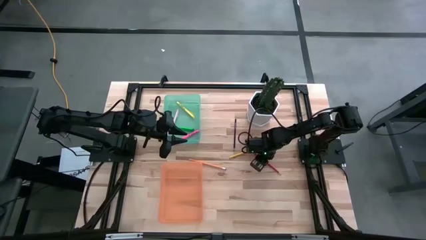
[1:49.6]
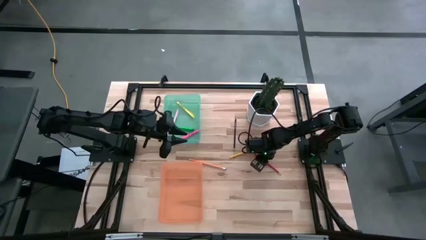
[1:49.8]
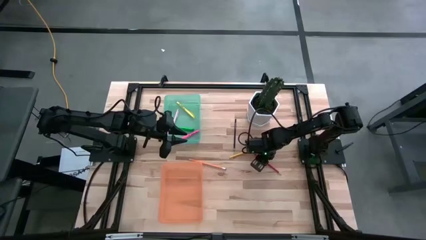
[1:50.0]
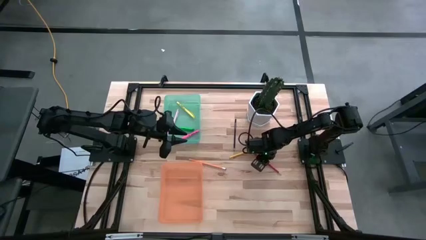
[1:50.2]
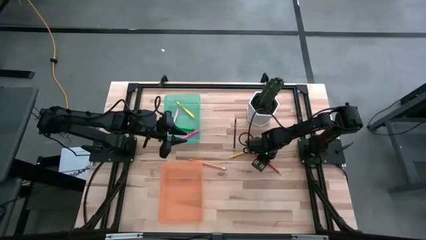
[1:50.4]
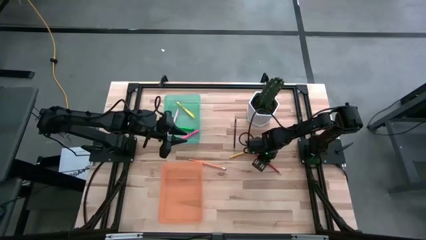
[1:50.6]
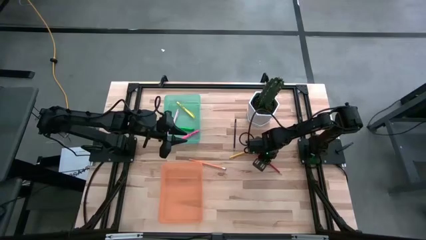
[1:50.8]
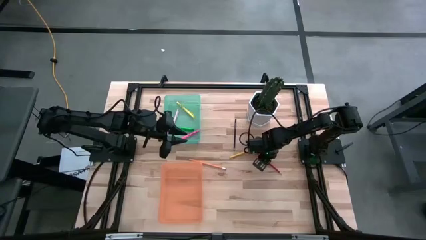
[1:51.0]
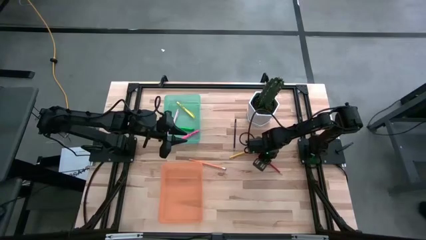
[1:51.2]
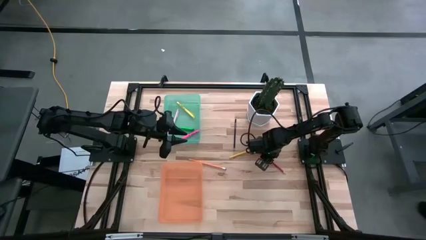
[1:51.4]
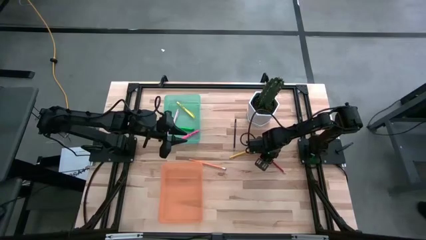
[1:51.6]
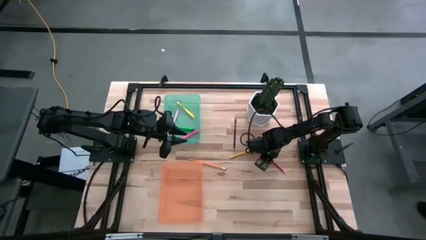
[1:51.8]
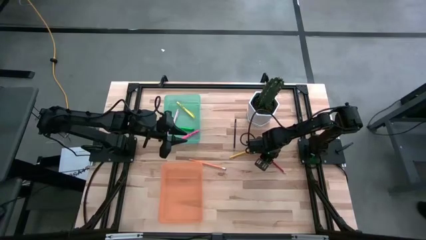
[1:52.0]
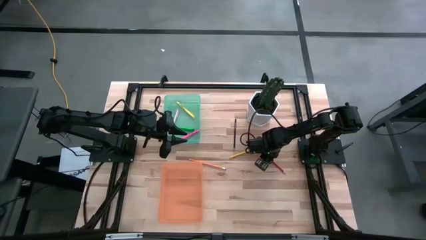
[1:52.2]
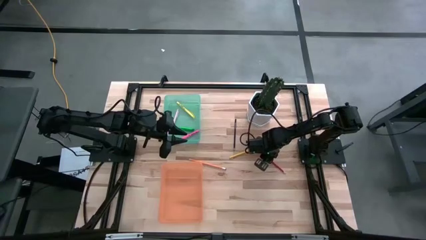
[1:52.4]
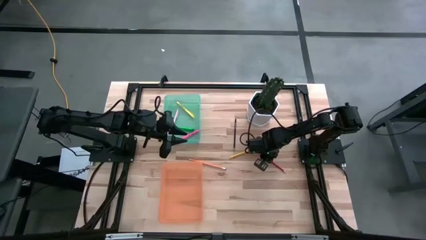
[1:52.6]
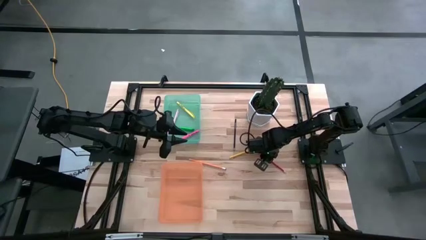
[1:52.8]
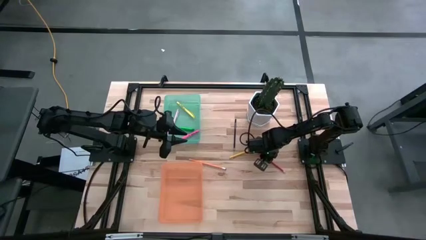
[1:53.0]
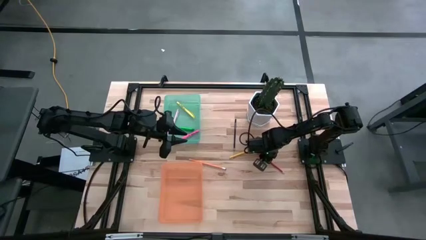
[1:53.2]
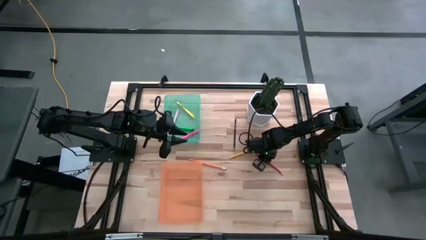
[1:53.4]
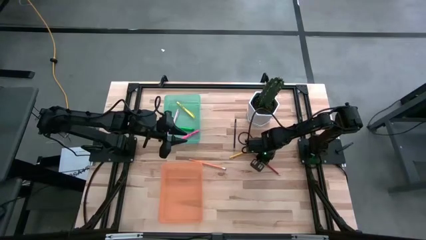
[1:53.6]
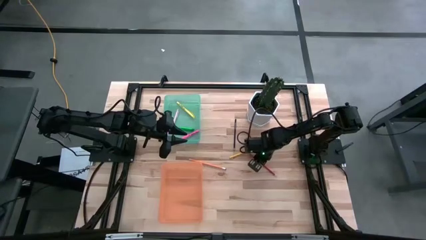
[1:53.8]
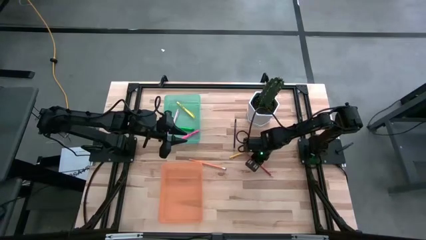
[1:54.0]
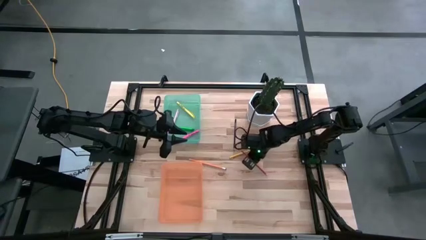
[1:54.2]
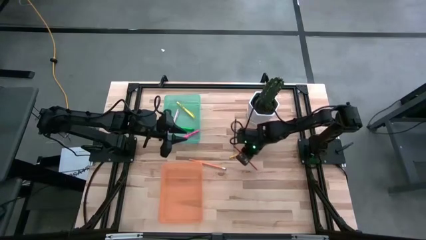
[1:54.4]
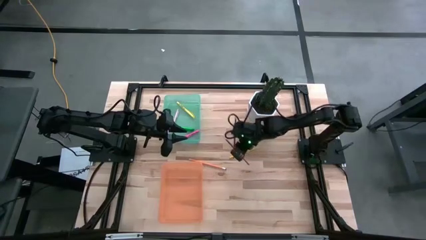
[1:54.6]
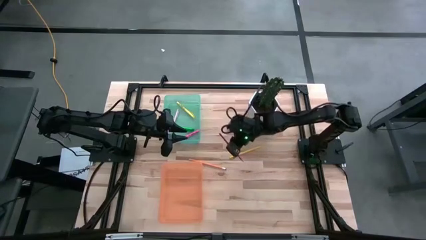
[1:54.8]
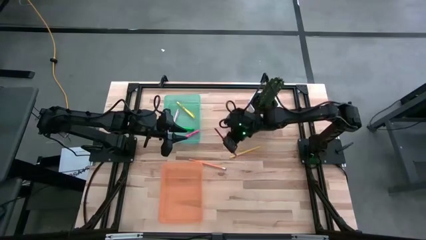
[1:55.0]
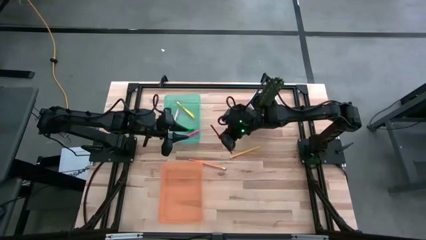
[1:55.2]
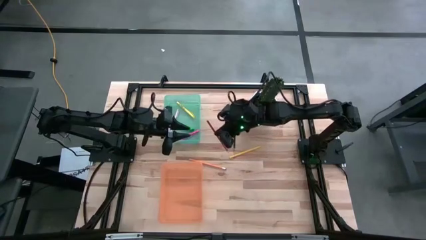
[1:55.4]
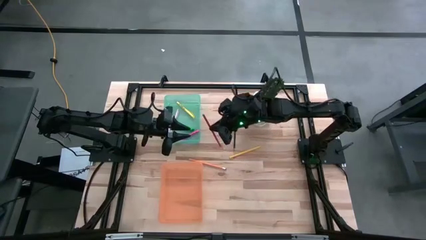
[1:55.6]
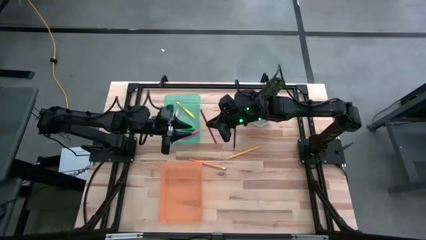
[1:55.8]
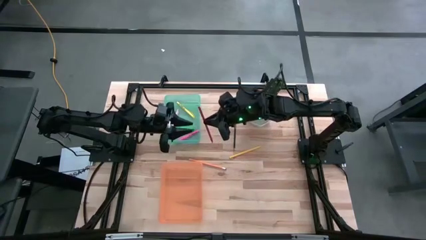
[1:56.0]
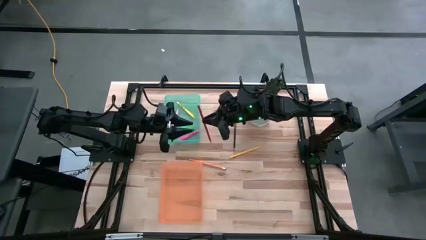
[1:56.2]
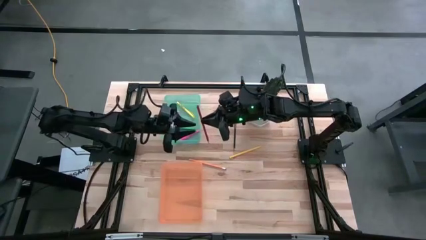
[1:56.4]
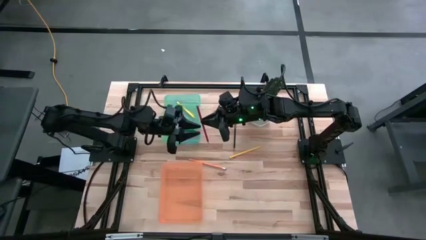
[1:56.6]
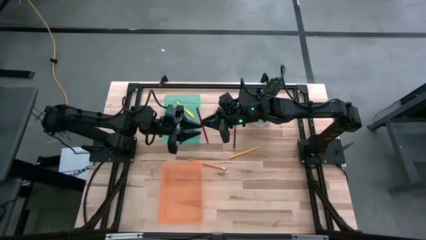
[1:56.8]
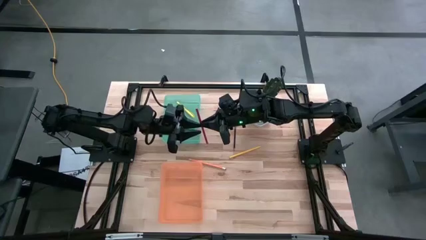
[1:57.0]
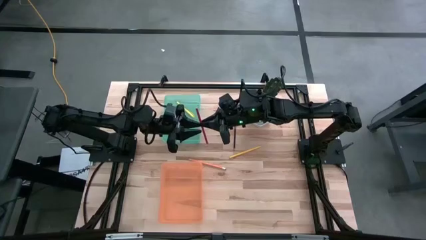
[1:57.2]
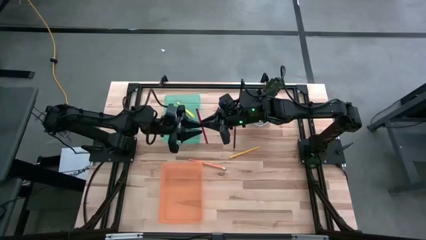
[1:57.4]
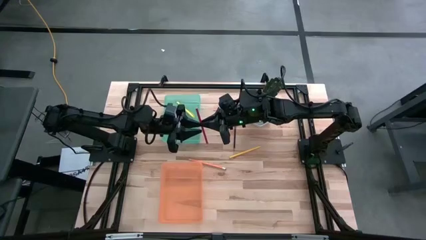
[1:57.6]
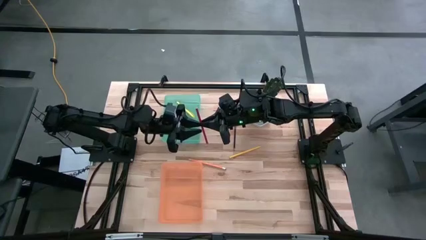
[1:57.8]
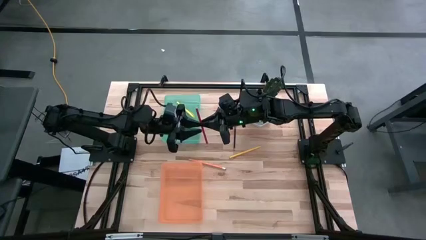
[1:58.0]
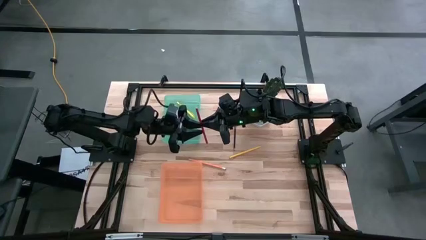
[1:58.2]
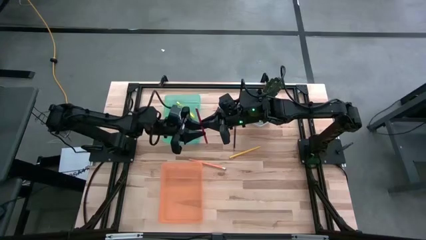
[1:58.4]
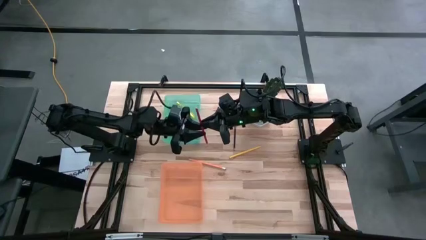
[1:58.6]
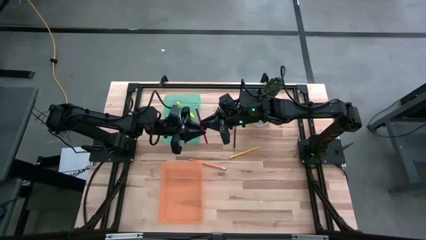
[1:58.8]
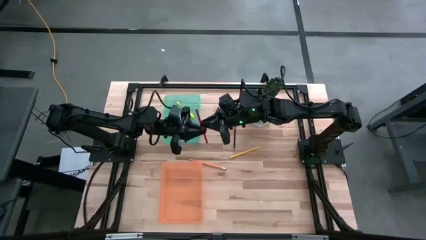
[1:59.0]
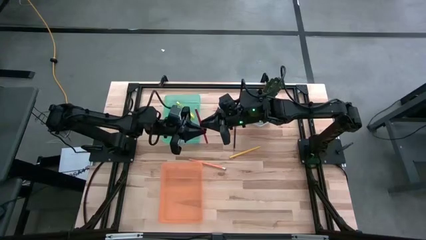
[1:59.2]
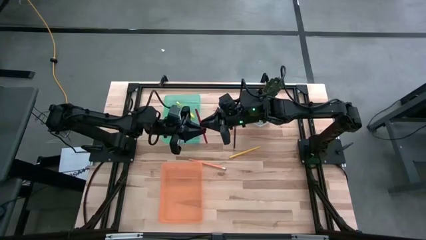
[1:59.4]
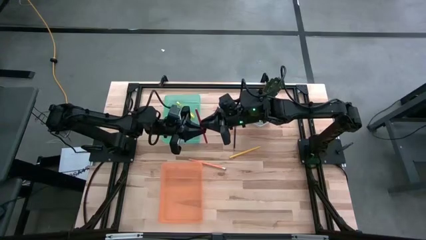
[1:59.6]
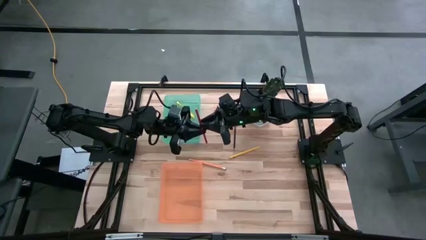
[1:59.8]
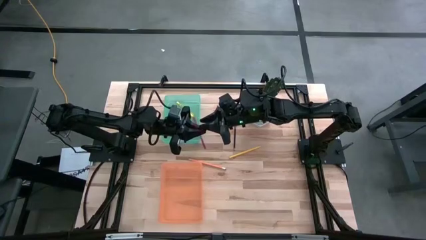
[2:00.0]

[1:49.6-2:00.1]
Task: Sort pens & pencils
Put the red pencil into the orange bin

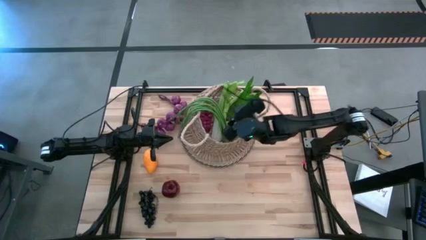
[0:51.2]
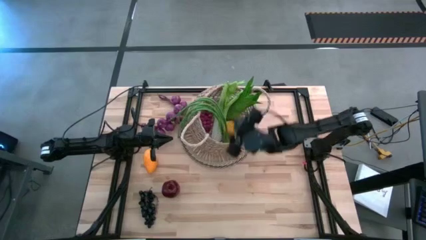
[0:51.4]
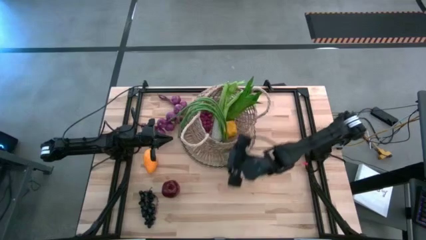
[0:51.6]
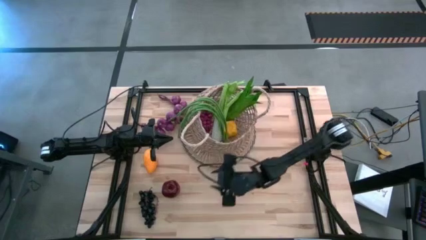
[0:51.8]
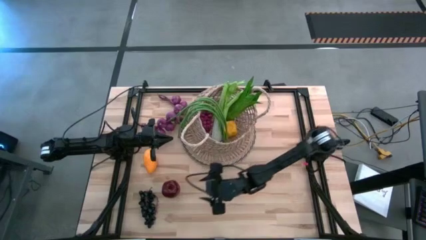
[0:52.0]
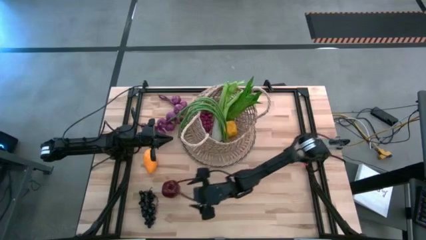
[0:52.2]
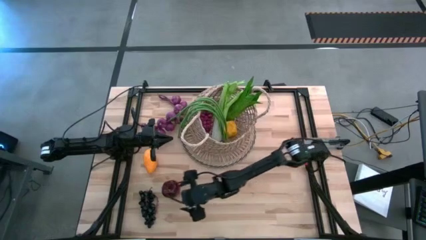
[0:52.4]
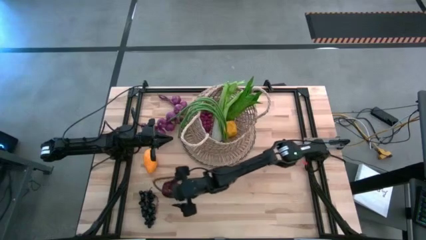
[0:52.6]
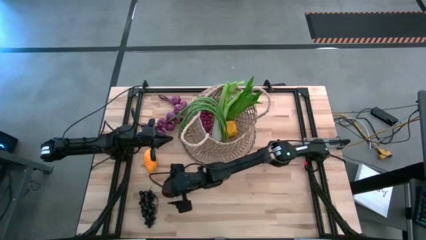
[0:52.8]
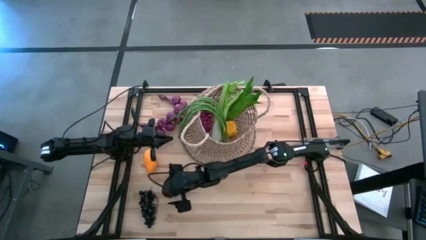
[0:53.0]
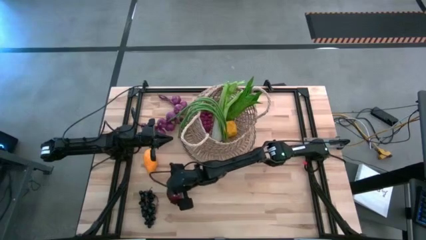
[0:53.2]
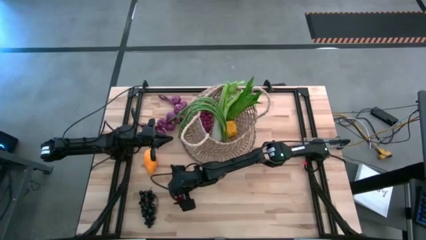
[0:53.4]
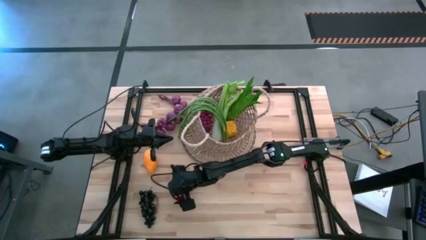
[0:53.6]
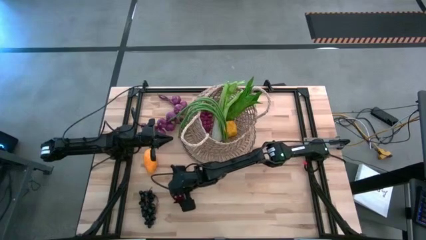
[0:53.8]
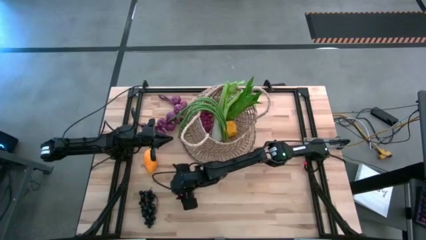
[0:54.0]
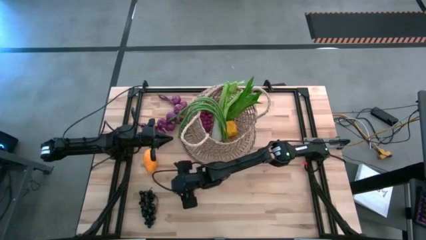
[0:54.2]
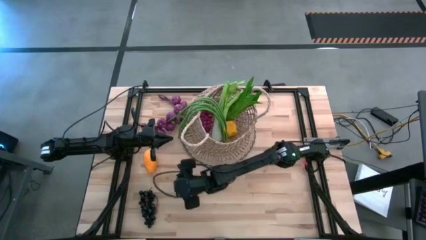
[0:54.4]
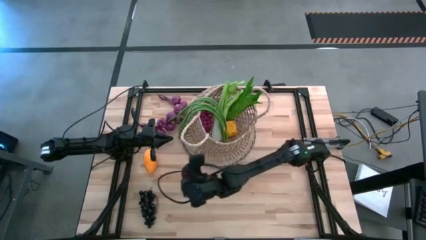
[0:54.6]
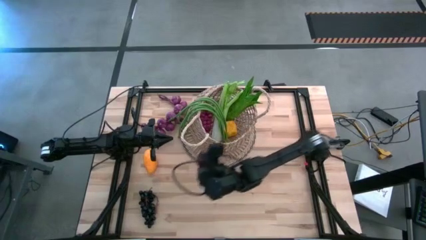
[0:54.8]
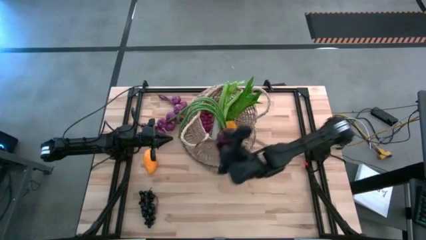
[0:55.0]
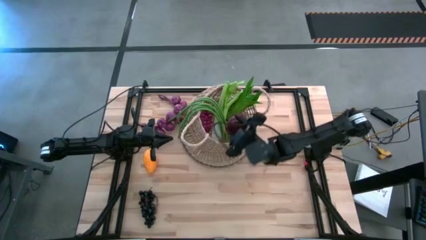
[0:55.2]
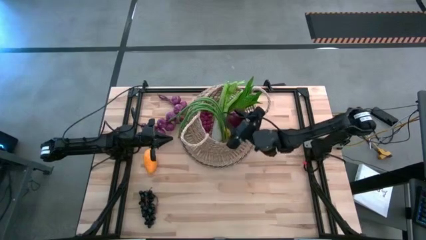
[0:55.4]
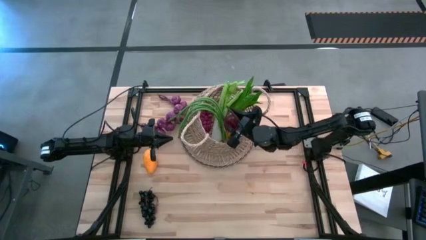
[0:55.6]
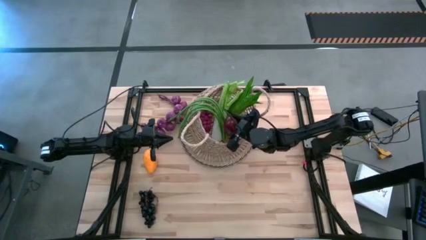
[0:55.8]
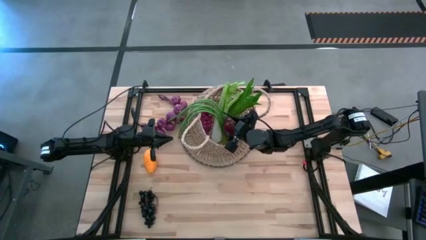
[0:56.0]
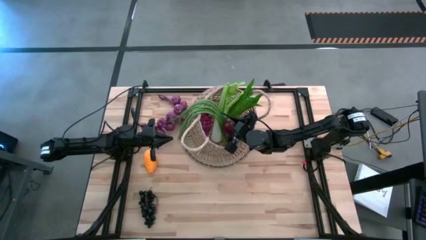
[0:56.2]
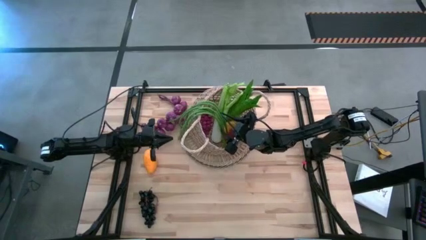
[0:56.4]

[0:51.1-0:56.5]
Task: Build produce basket
Put the red apple into the basket
